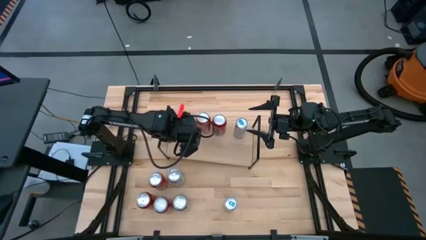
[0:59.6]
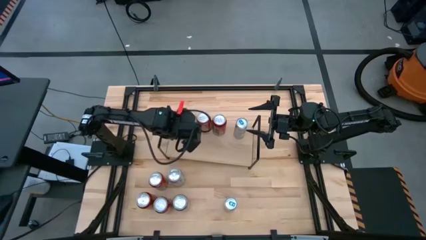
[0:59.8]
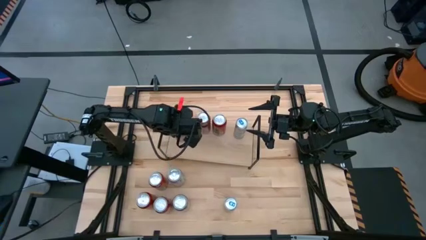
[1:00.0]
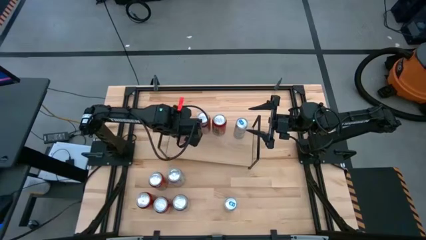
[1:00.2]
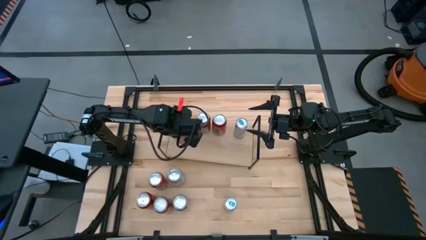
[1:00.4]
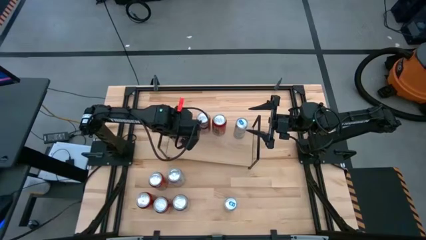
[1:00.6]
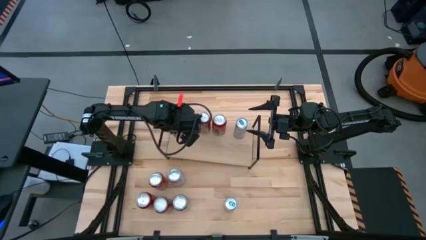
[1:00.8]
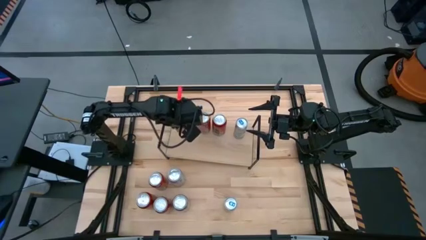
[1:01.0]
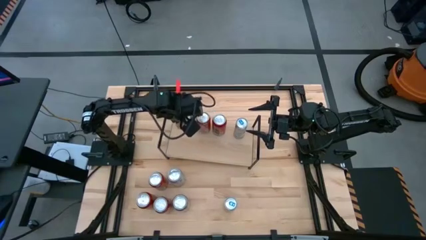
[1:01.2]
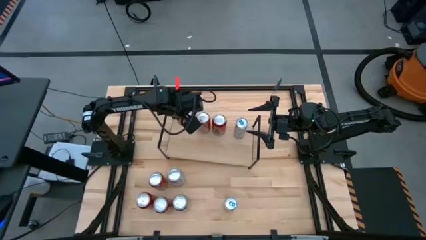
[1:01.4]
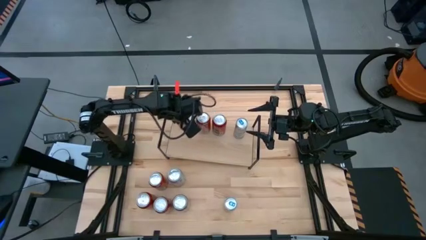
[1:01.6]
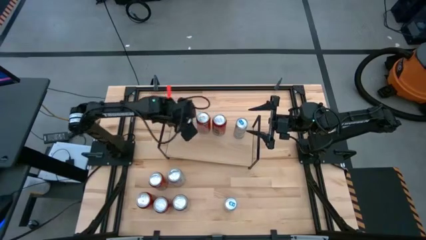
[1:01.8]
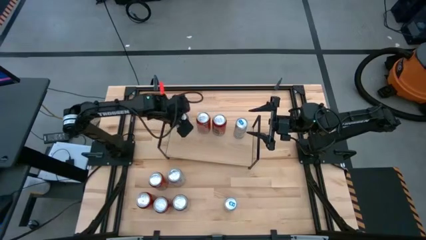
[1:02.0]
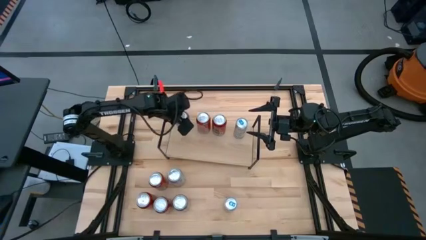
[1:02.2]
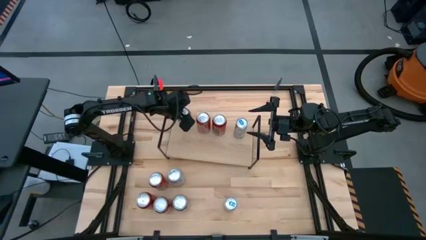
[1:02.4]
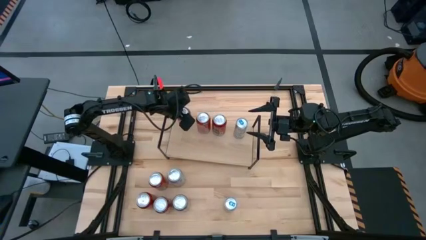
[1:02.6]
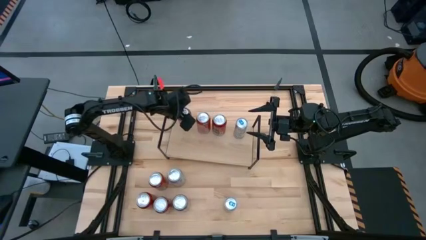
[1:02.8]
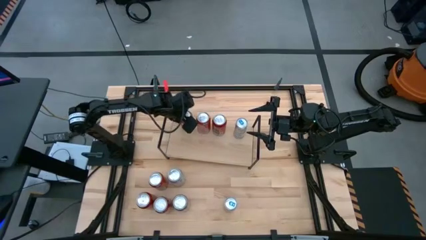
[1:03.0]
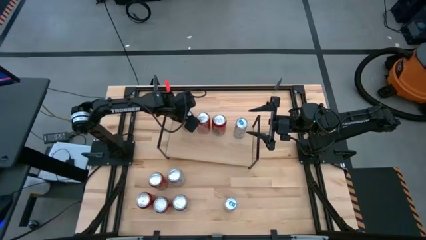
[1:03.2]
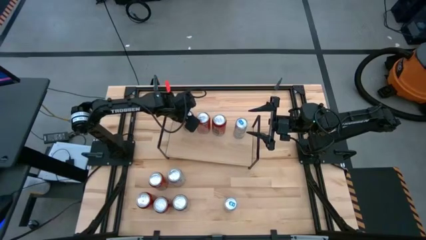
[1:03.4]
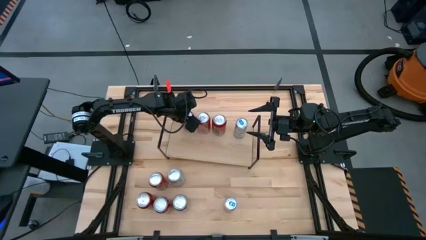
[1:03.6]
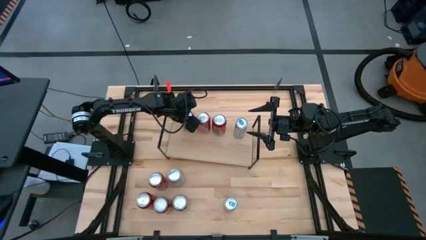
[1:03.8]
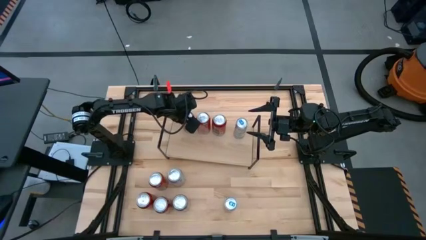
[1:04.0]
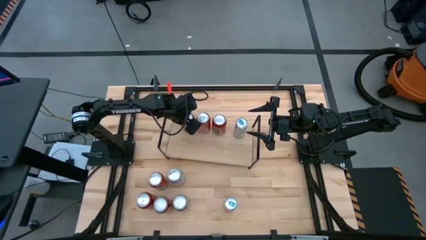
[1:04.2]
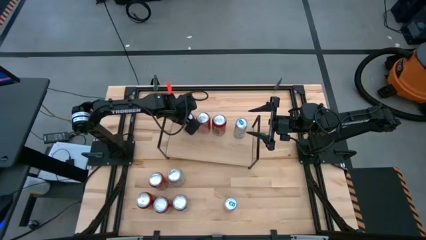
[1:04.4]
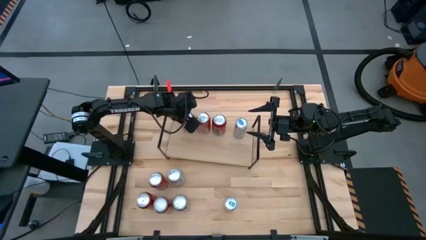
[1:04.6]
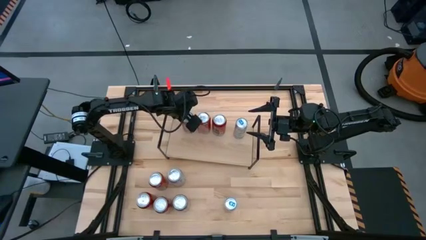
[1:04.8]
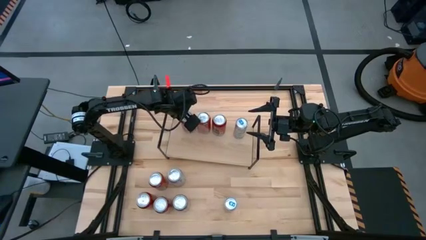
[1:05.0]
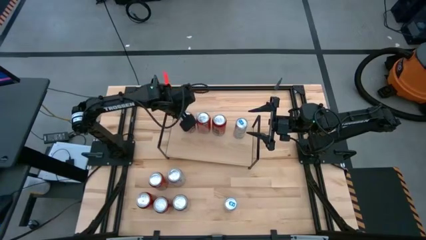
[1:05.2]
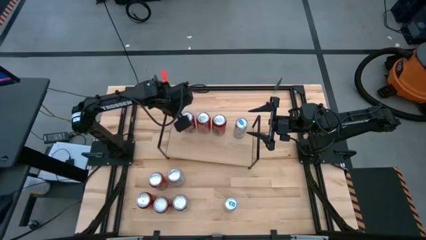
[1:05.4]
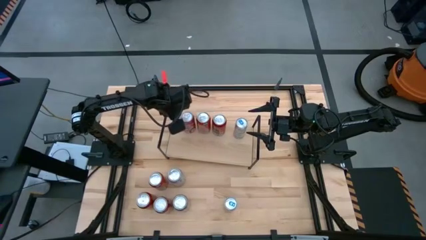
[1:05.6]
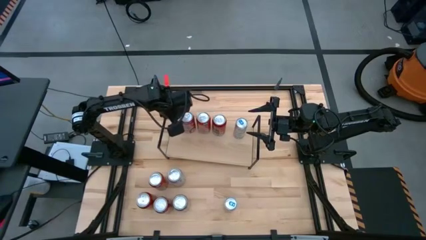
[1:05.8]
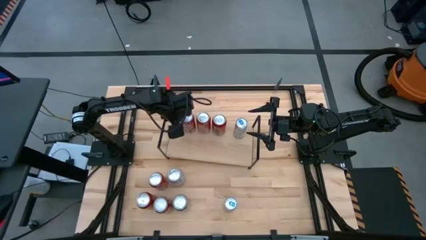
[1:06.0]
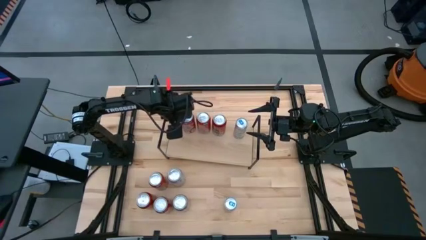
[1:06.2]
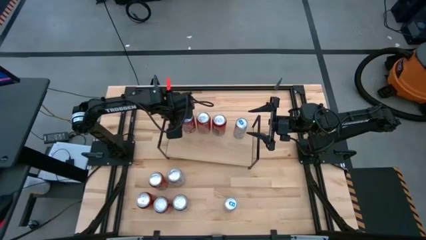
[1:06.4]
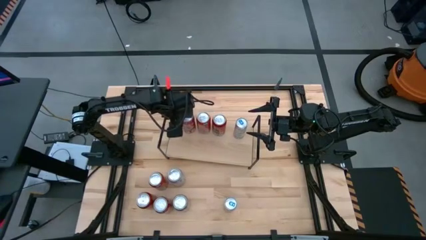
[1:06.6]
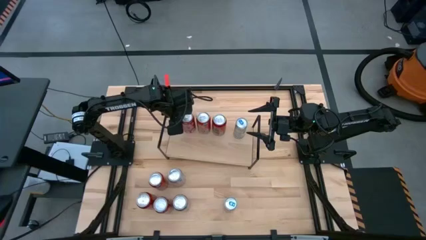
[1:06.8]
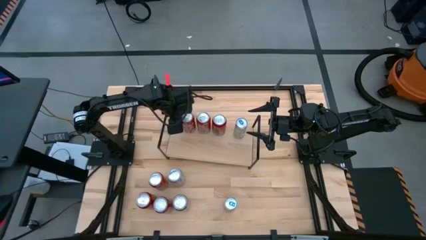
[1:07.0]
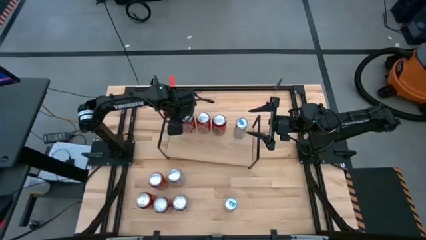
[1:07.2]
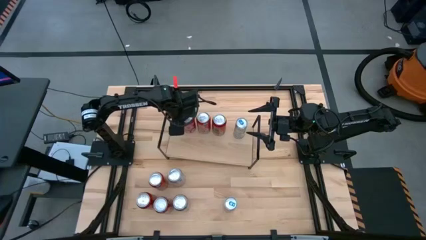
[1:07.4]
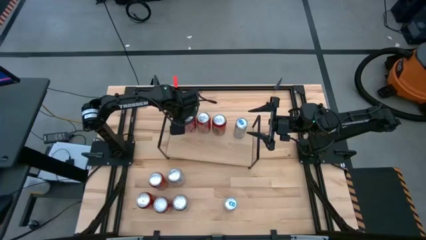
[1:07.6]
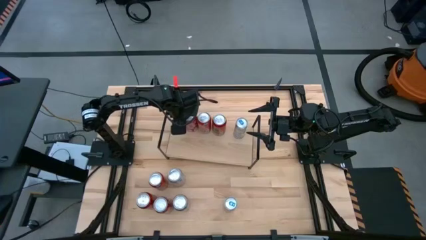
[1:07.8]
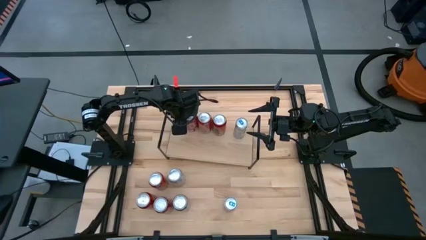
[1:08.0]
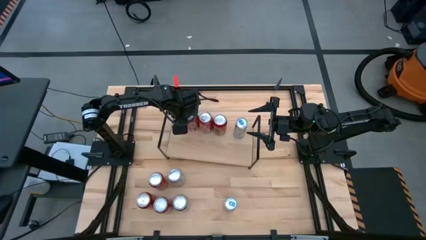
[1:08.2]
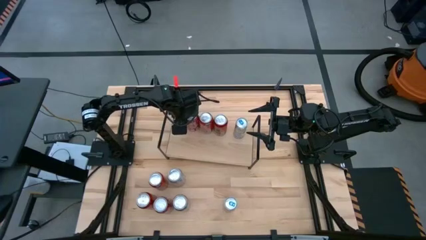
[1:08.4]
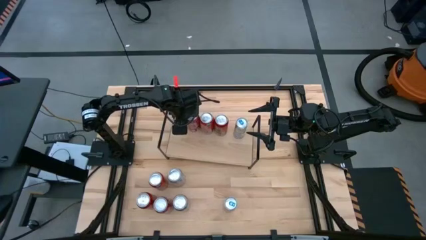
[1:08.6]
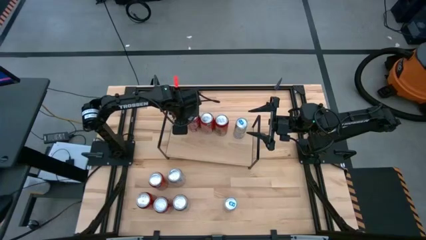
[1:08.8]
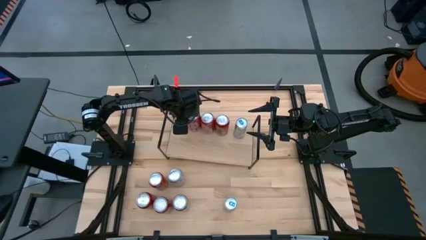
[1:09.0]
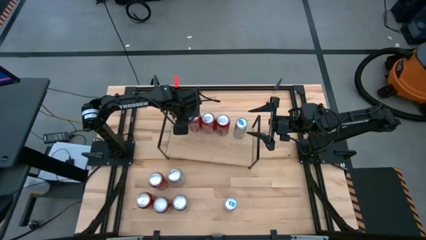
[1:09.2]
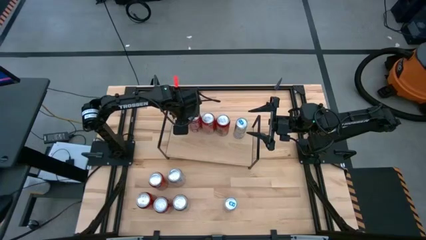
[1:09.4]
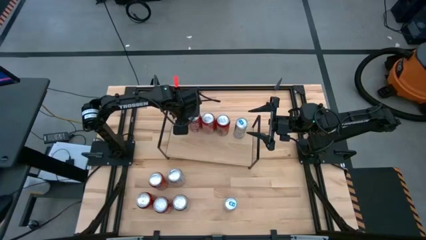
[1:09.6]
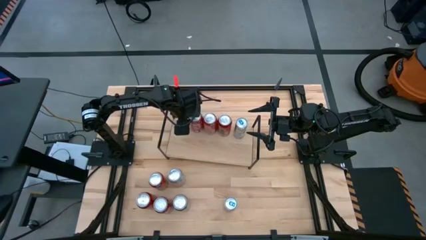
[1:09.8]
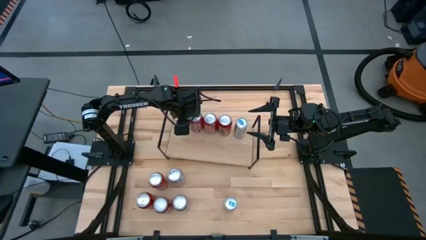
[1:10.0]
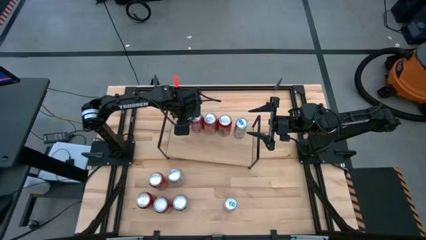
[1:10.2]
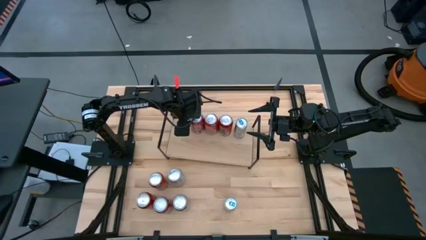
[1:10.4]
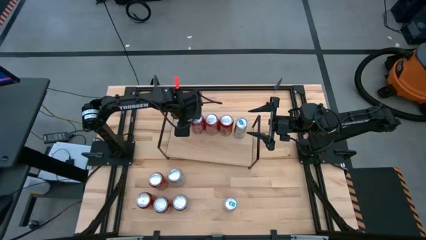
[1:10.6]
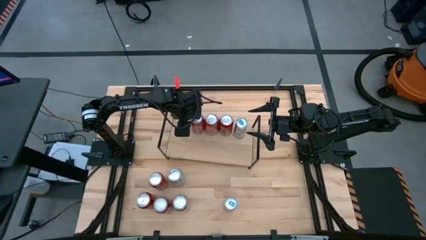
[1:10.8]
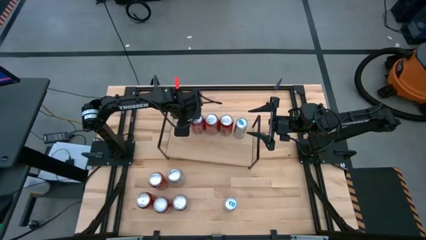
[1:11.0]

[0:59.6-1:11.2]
Task: Place canned beverage on shelf
Adjust the red-white soda can on the shelf
